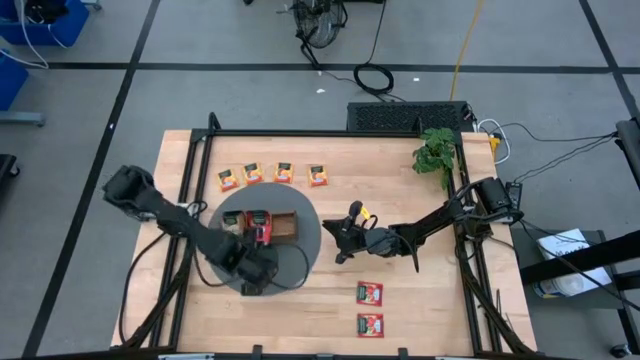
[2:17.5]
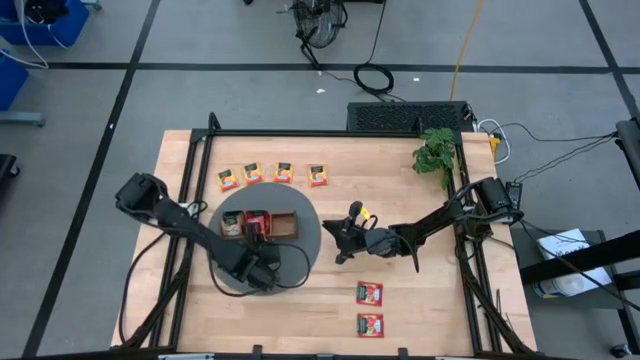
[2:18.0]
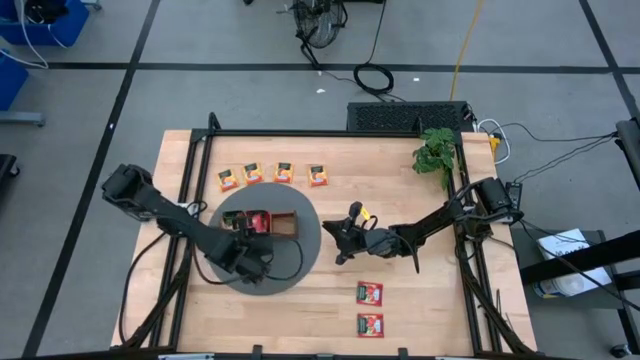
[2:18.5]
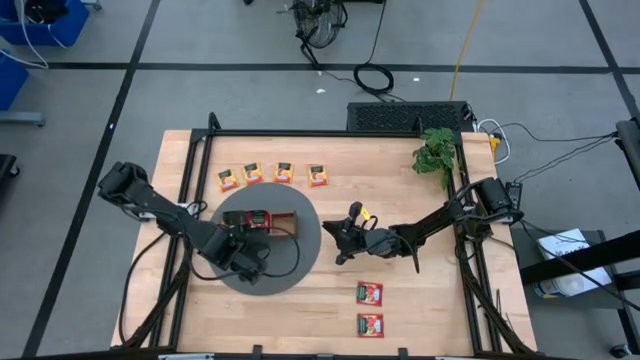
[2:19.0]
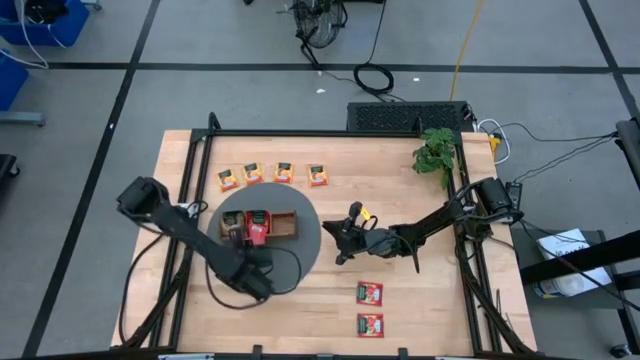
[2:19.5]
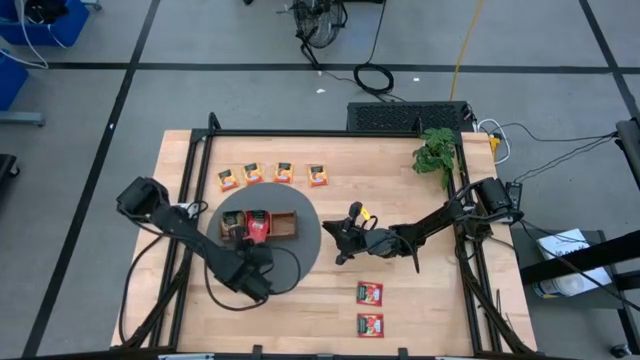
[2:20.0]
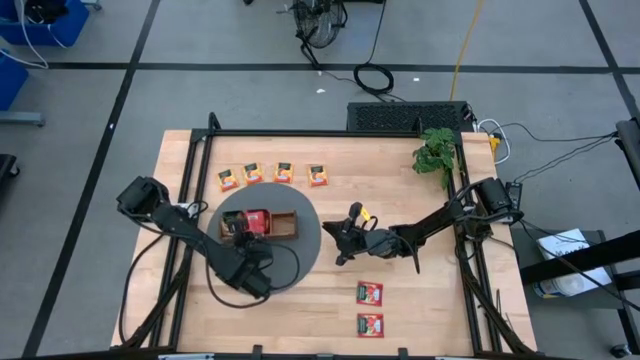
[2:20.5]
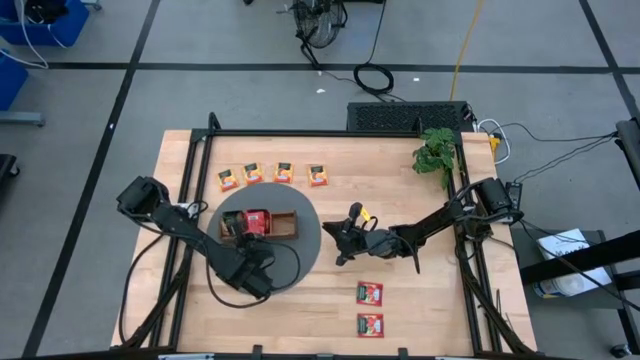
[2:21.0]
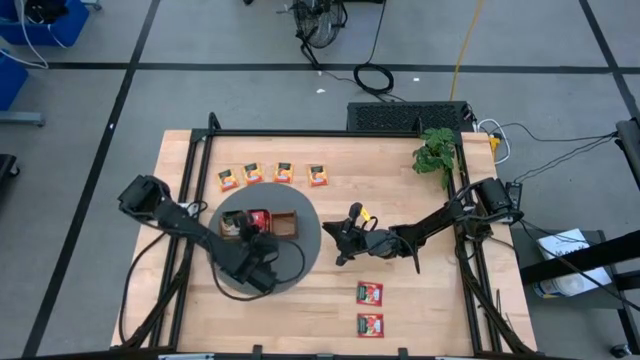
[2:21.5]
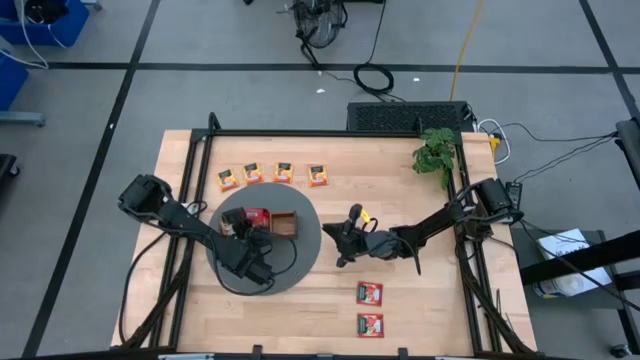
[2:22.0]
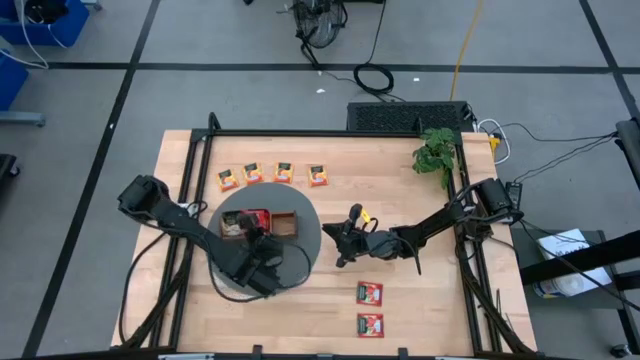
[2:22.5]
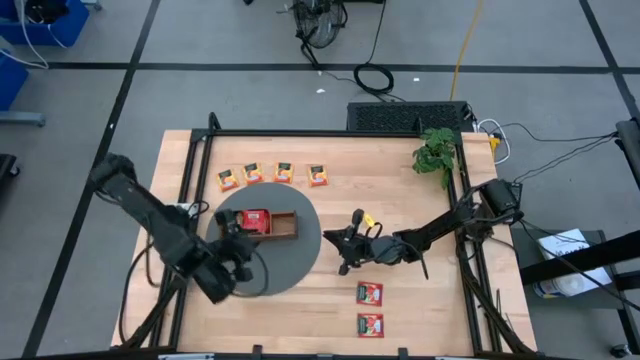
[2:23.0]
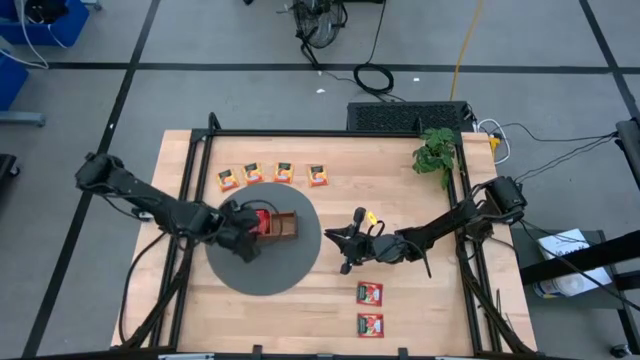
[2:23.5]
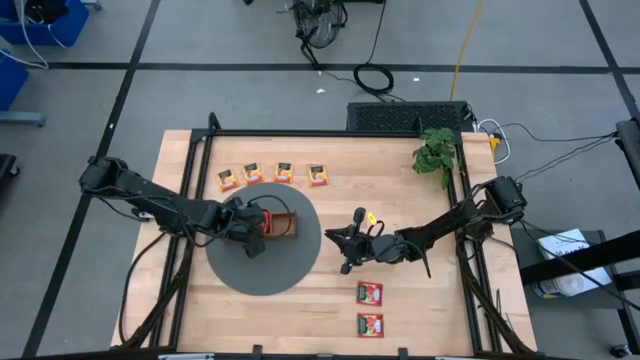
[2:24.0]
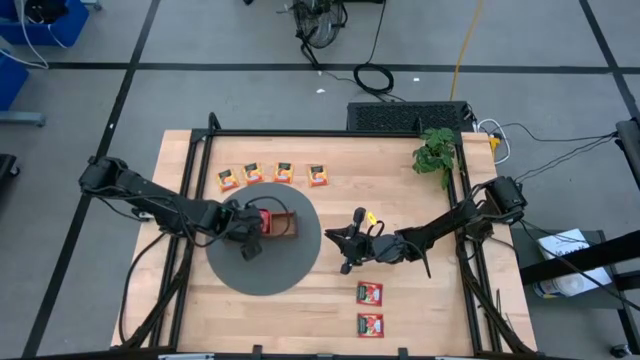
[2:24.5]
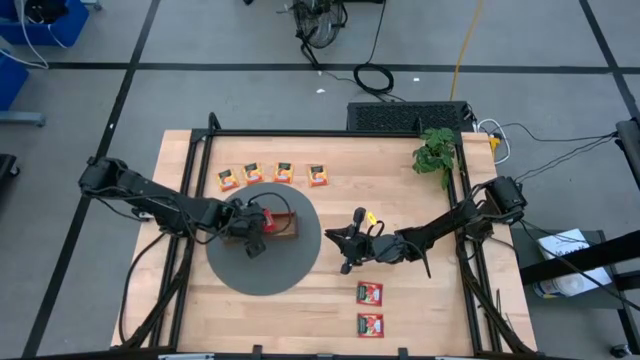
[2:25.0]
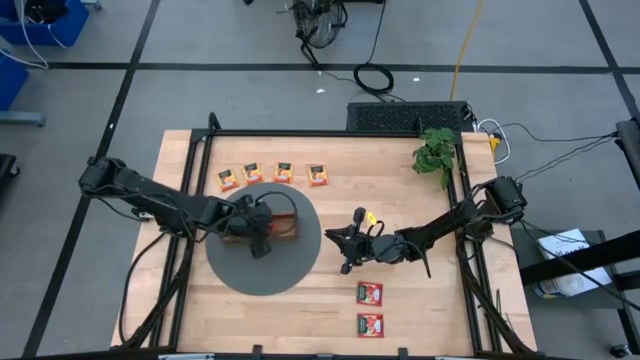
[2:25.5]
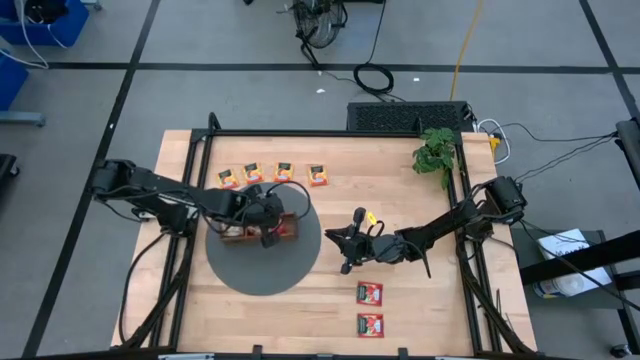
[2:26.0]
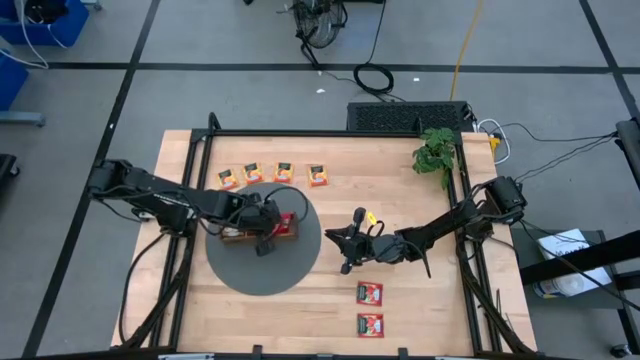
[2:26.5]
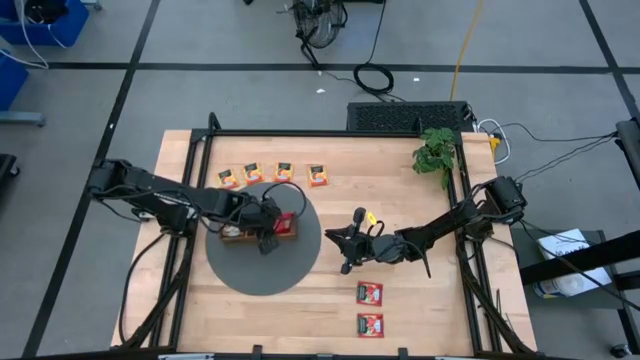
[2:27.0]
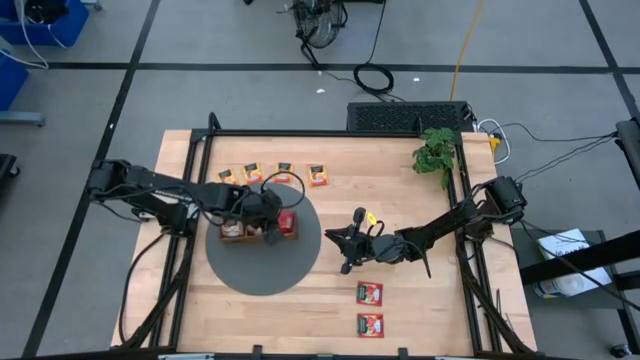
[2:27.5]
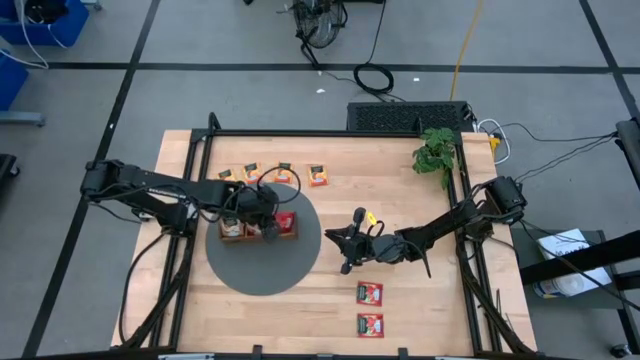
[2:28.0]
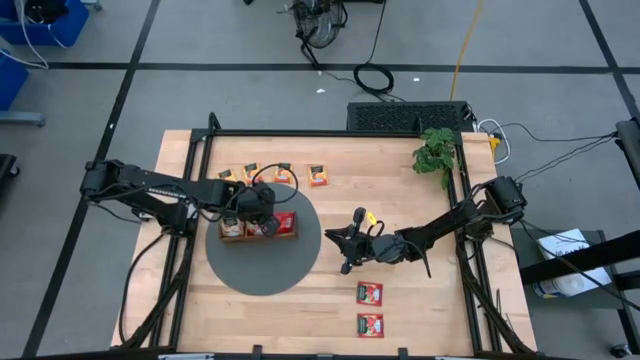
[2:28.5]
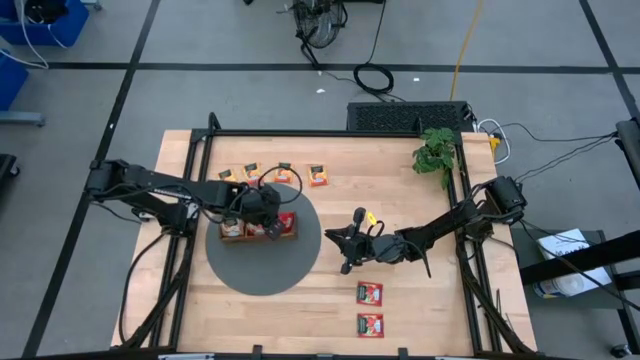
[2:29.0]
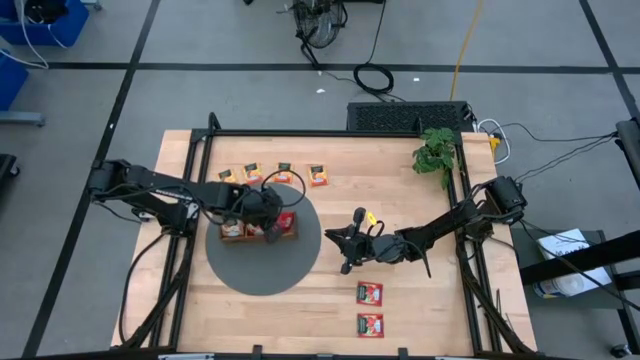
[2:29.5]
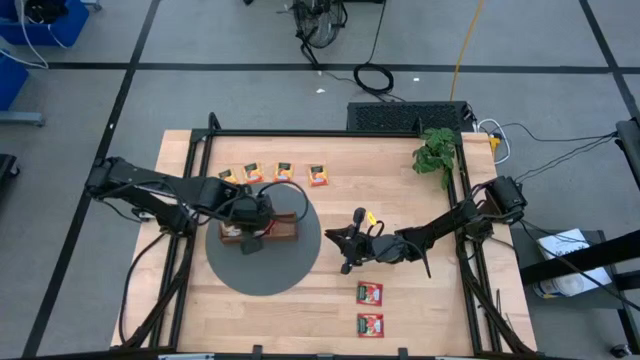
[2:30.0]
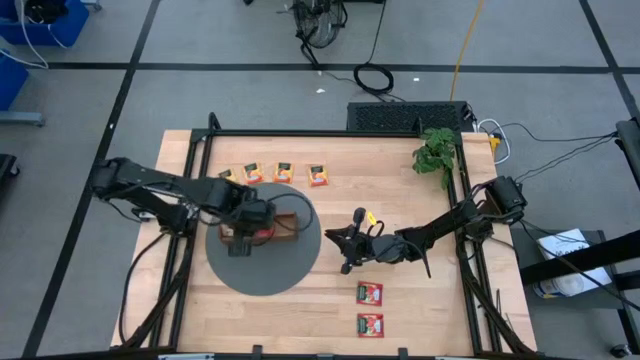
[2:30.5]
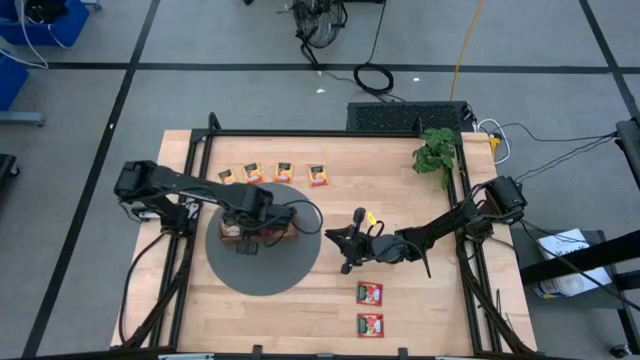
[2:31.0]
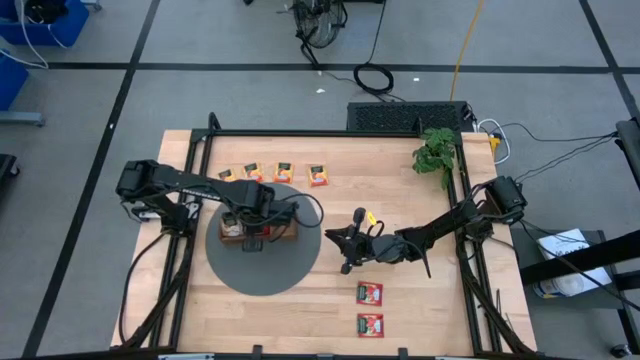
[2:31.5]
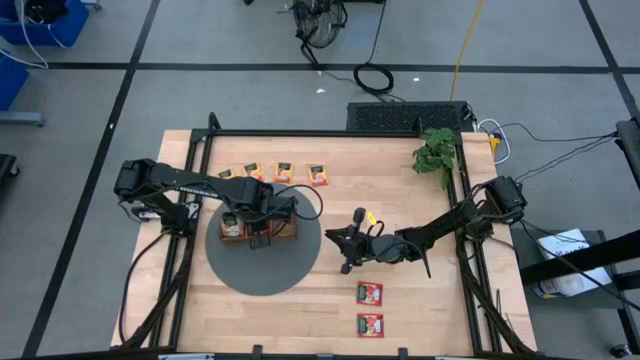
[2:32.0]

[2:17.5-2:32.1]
Task: Pick & Place Tea
Put the red tea bag into the middle section of the wooden organizer

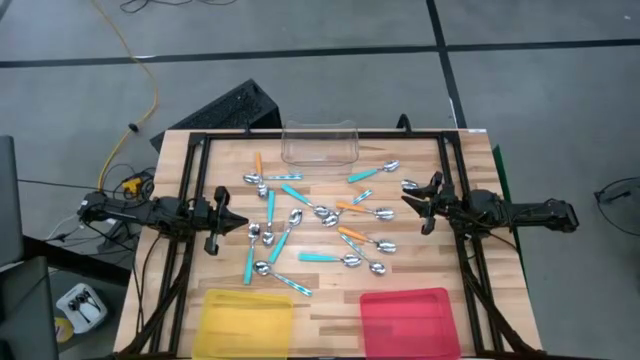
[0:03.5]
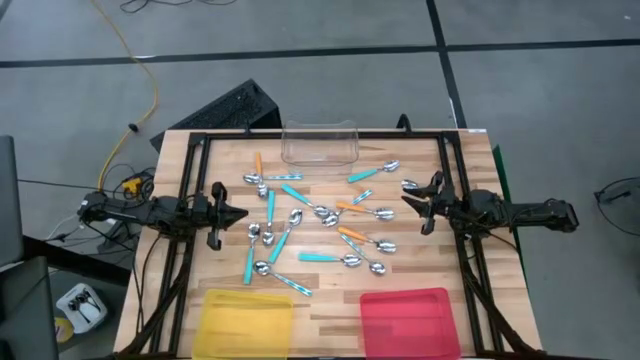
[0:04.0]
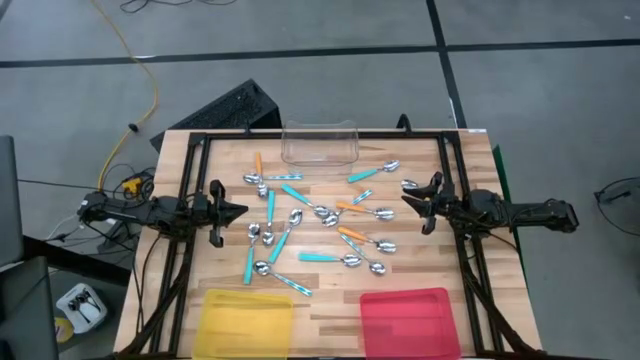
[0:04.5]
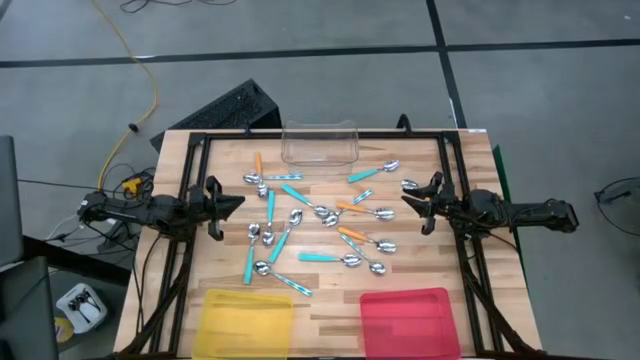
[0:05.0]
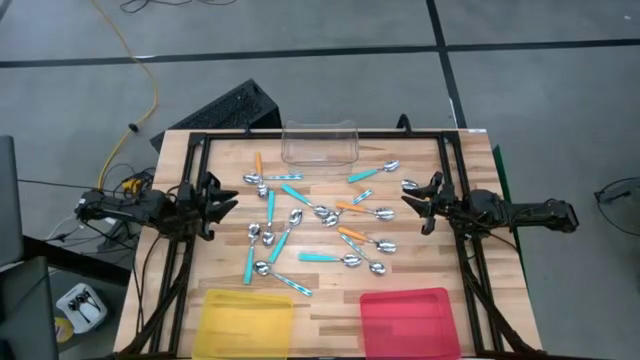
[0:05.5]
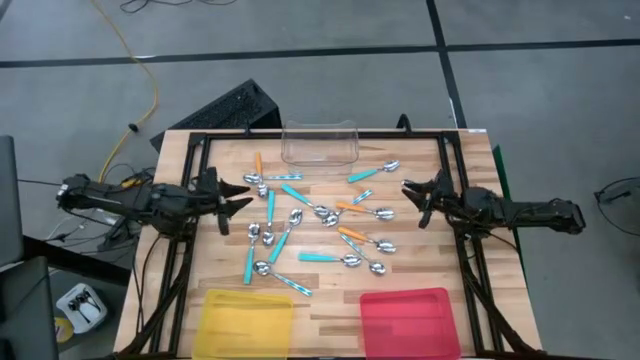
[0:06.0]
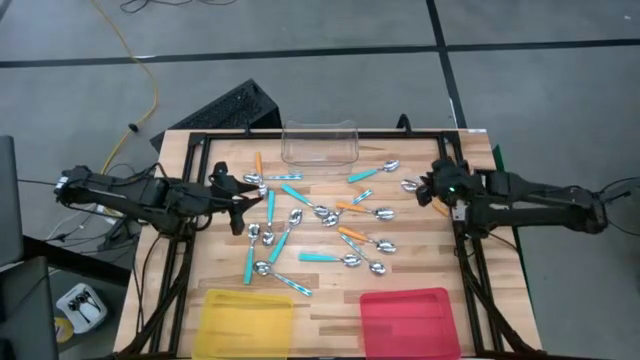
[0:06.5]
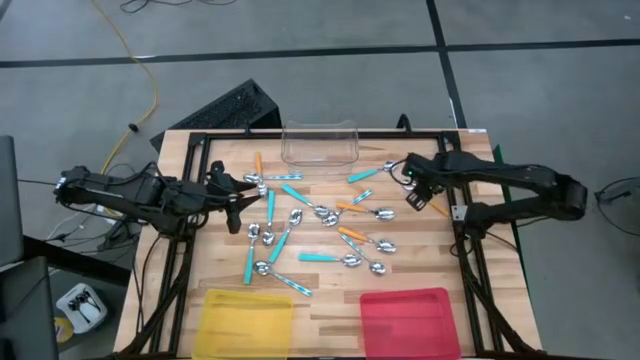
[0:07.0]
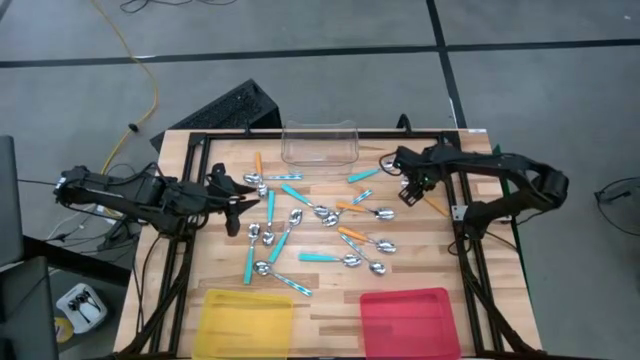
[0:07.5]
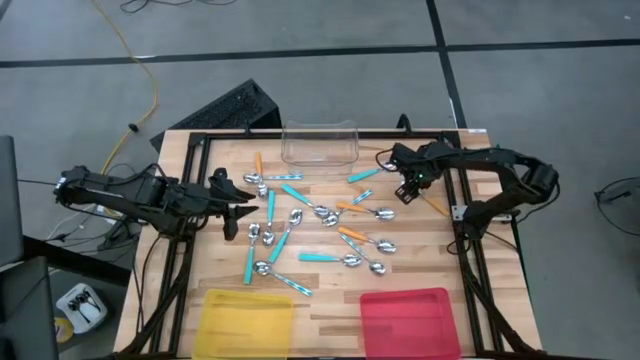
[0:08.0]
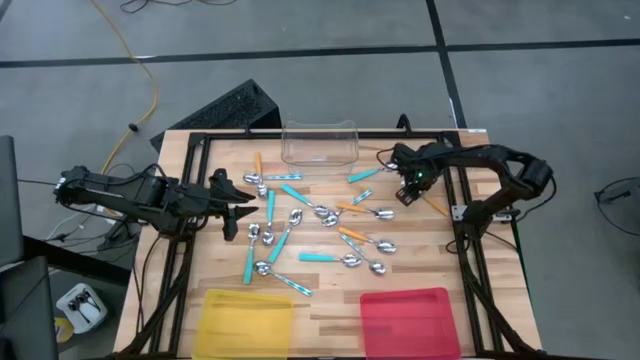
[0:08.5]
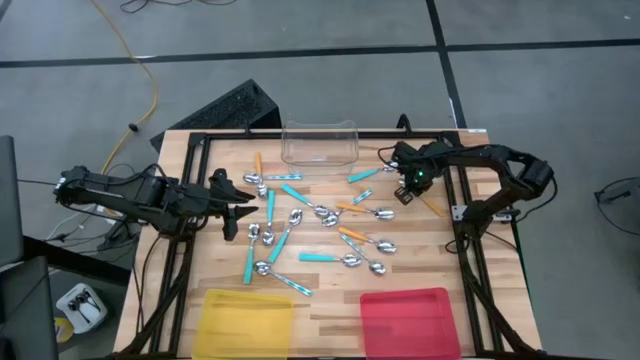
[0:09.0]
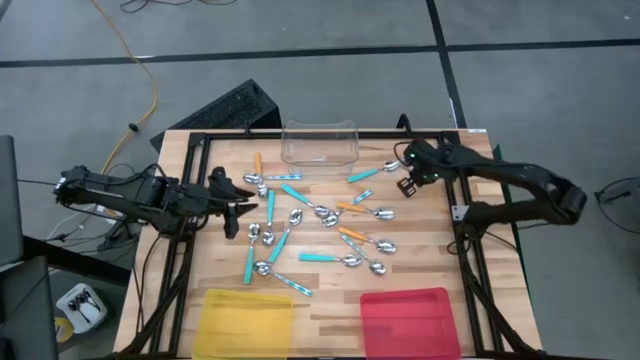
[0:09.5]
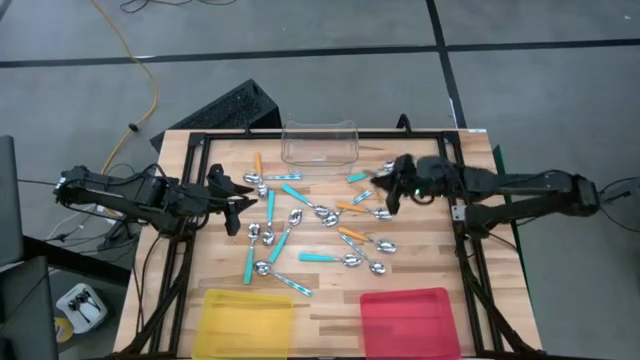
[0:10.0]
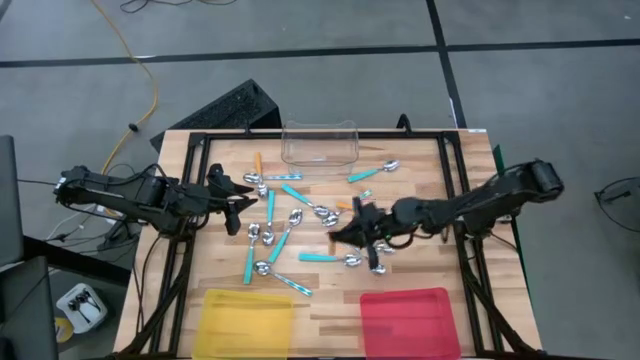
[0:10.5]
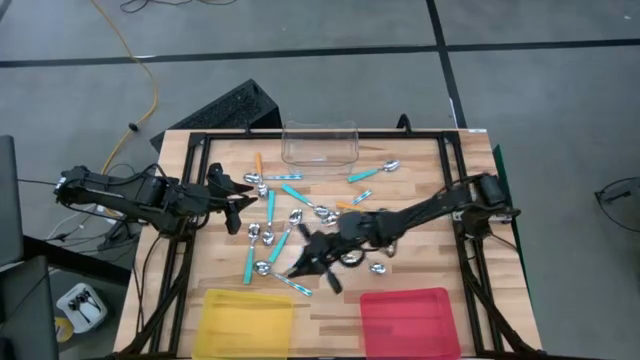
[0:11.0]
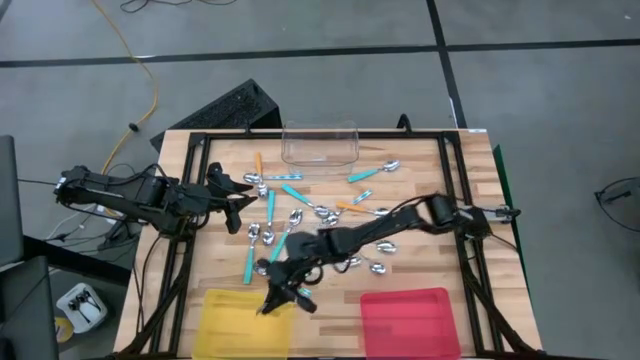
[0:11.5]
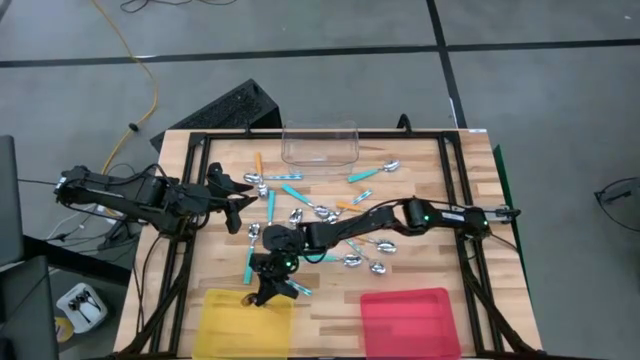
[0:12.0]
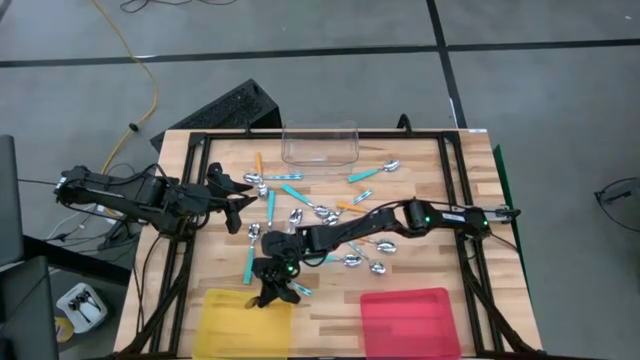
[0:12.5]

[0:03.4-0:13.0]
Task: Sort silverware by color (type)
Put the yellow spoon into the yellow bin
